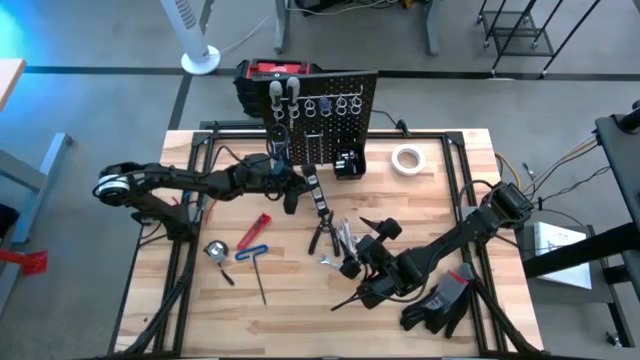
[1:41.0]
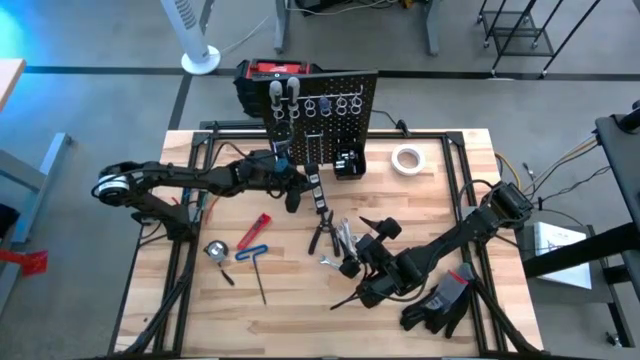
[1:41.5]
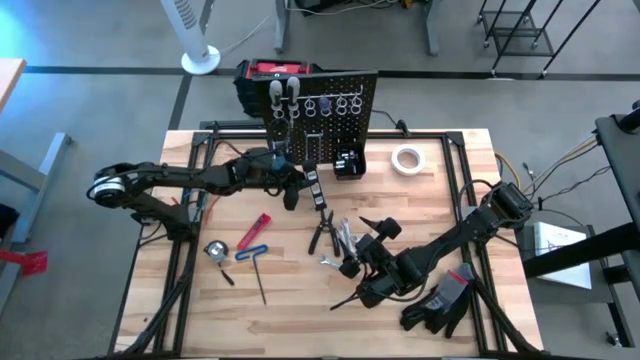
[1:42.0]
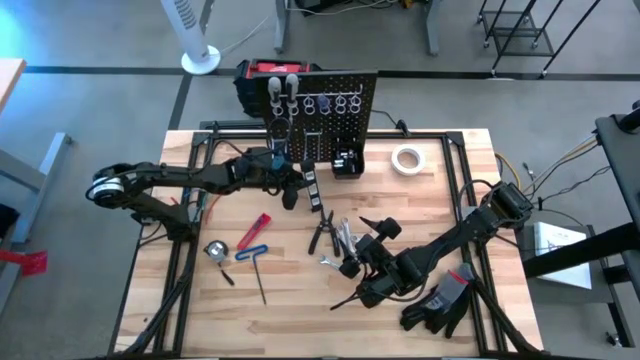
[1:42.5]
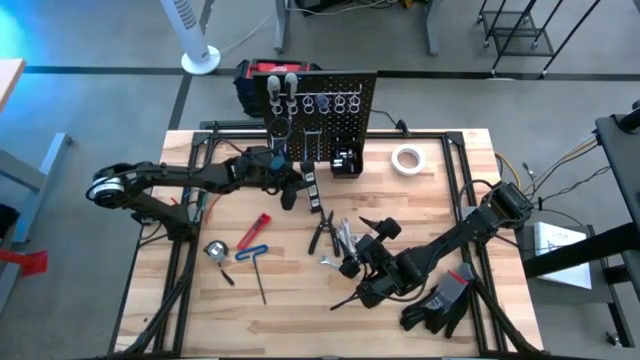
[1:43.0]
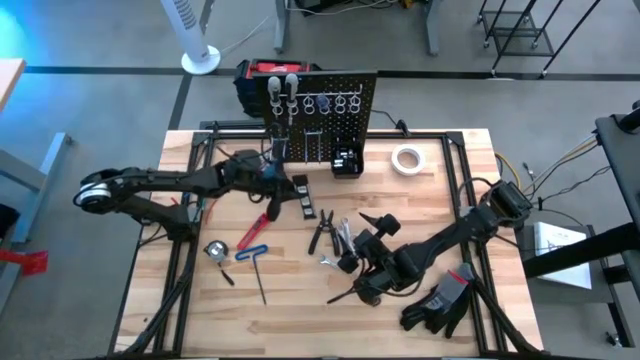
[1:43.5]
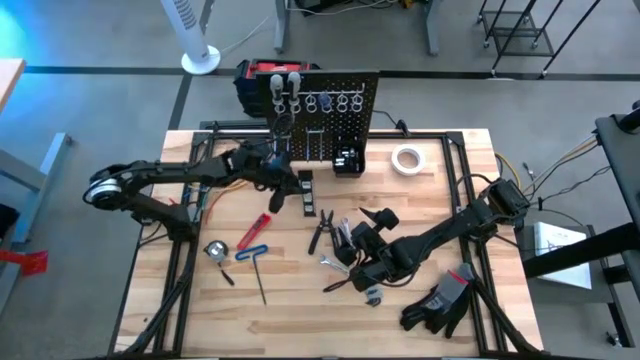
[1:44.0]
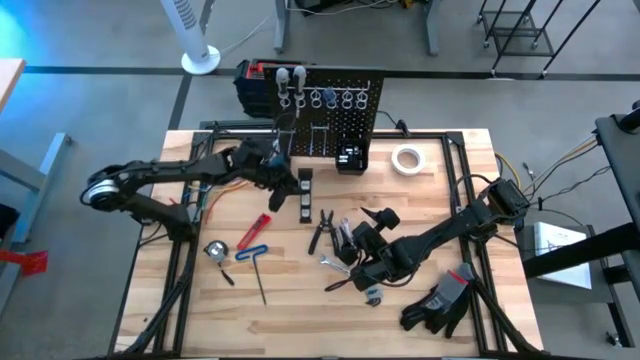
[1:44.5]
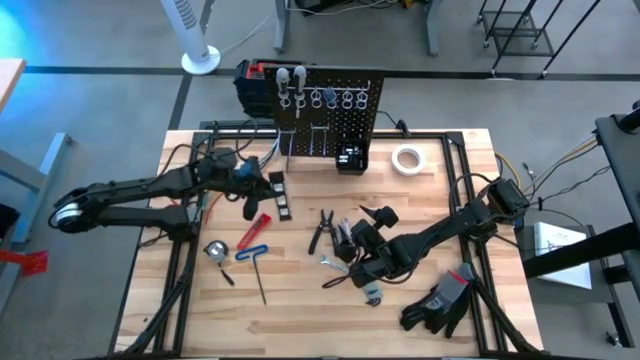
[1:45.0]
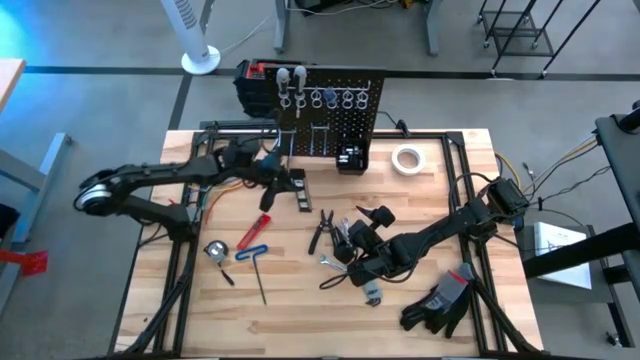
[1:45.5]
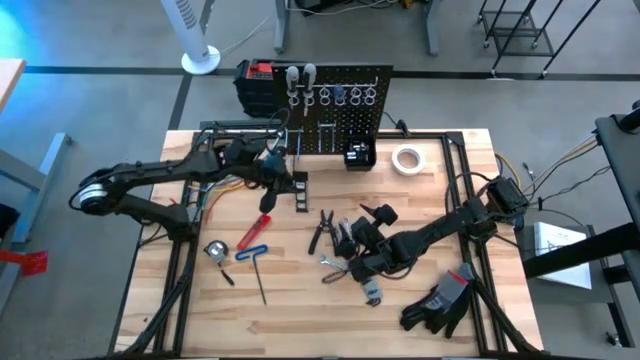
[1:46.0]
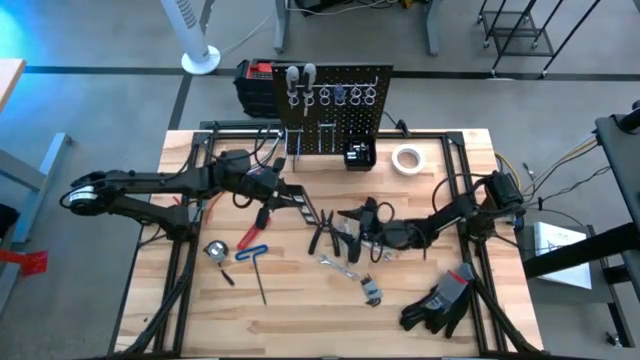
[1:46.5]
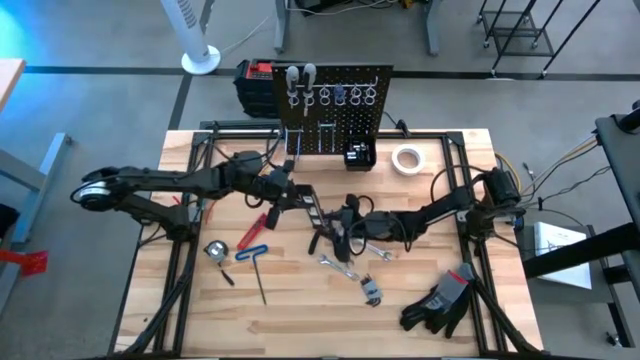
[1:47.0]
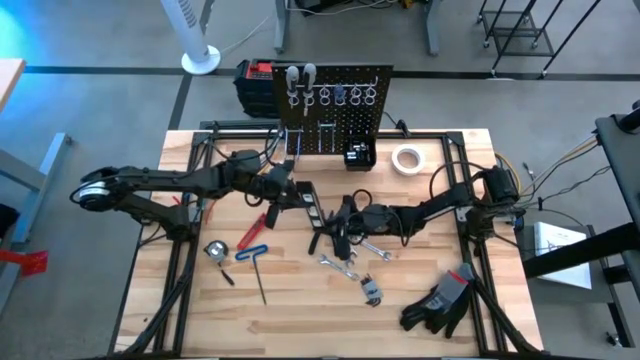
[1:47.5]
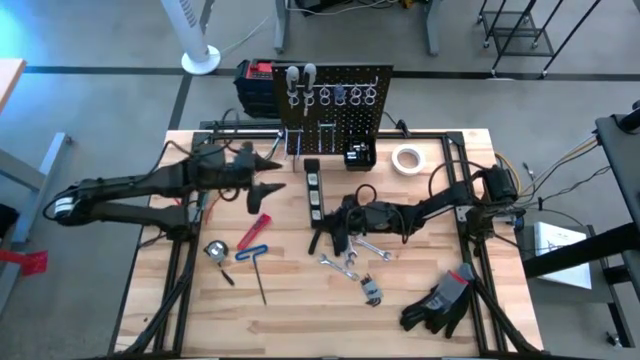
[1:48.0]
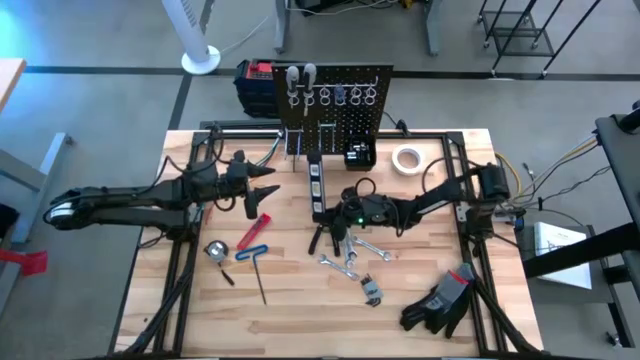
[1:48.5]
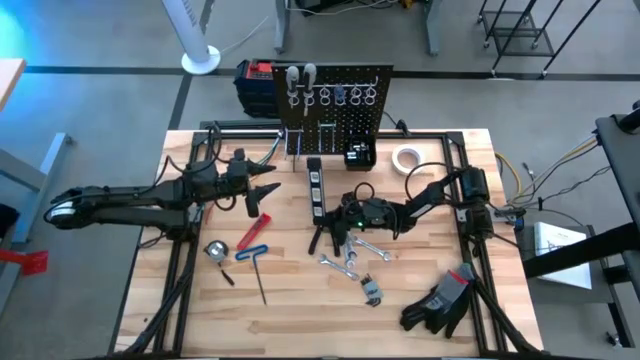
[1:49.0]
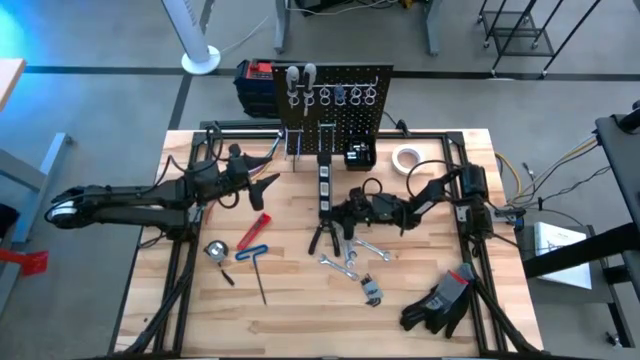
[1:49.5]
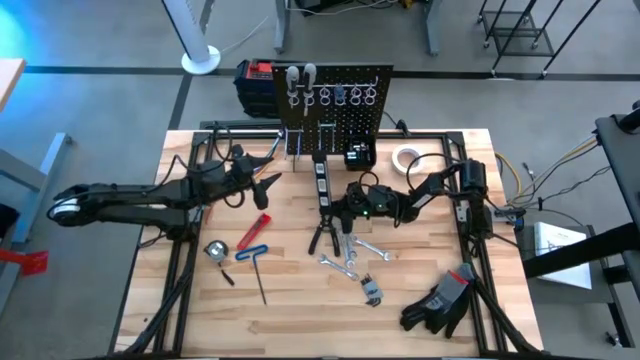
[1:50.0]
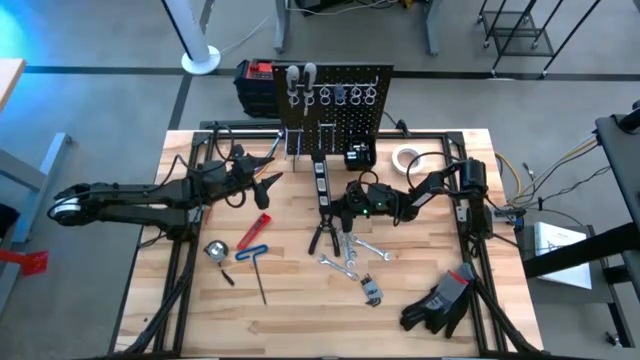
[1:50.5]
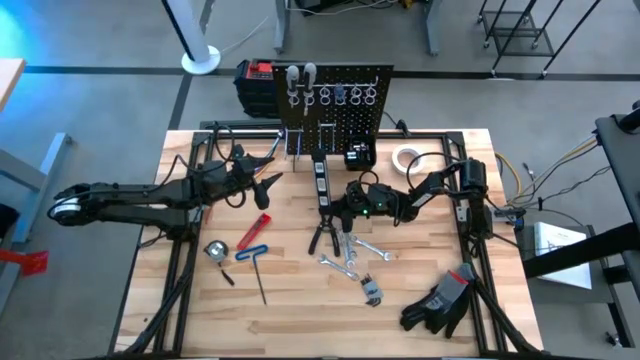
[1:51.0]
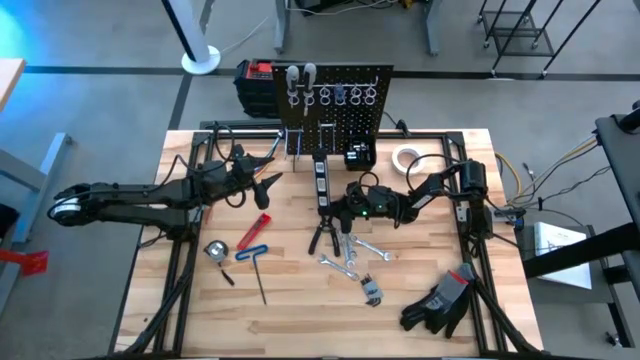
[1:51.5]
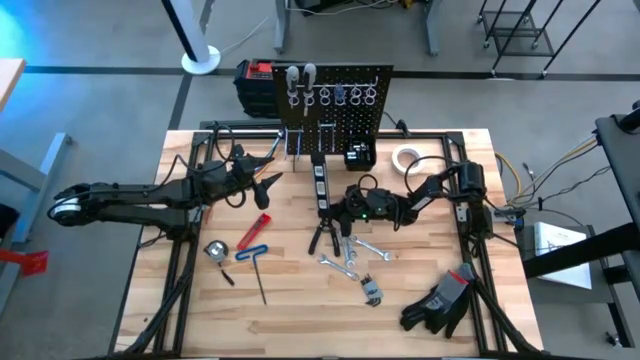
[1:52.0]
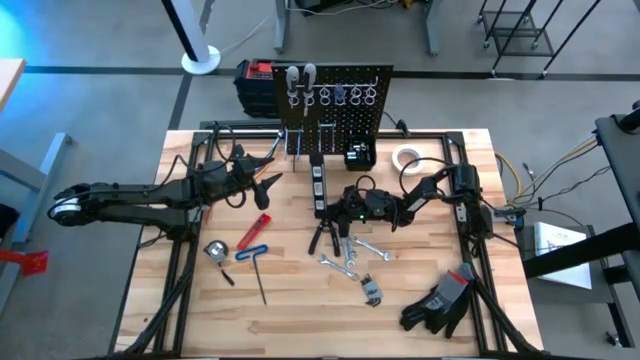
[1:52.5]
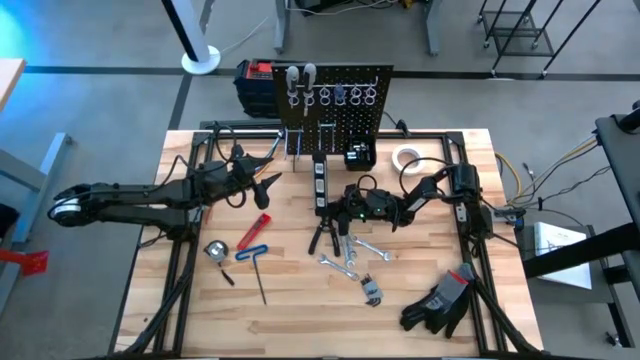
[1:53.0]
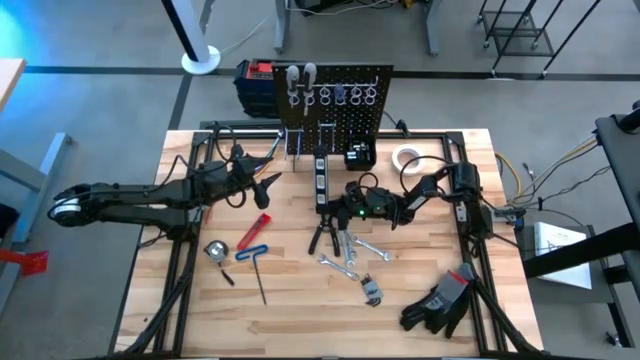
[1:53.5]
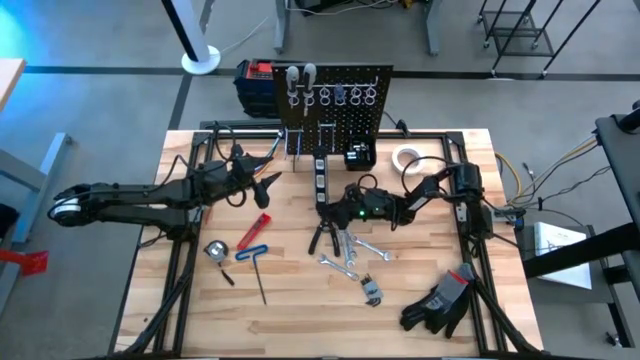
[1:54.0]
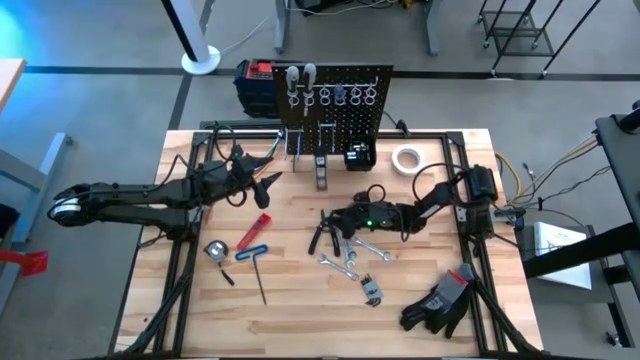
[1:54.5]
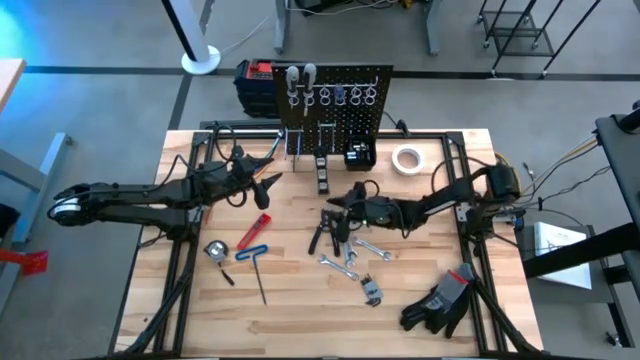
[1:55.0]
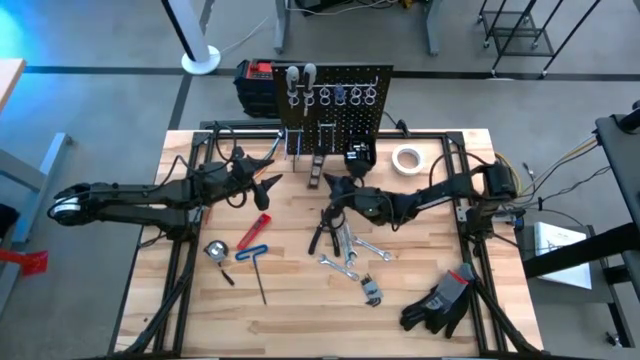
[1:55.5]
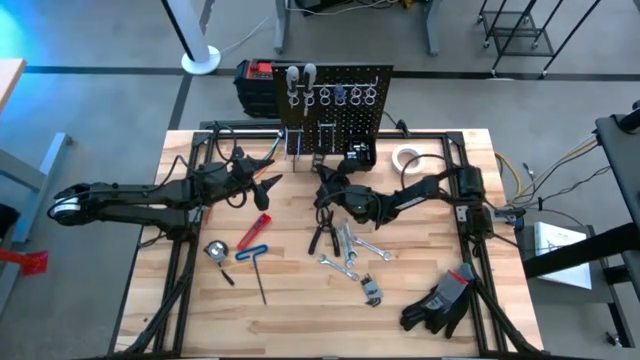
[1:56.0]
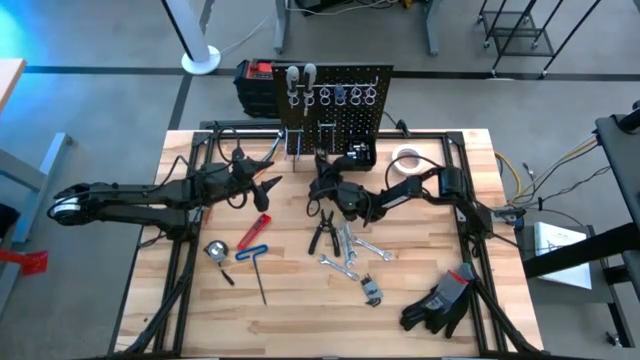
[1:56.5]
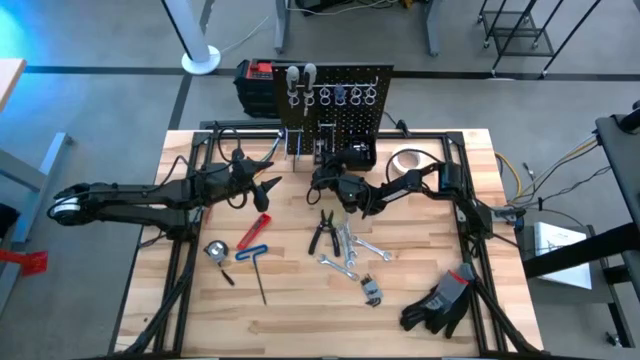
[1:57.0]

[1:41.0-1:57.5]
Task: Hang tools onto peg board
Hang the spirit level on the peg board

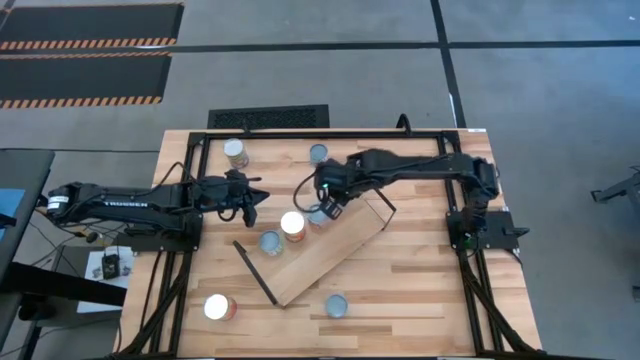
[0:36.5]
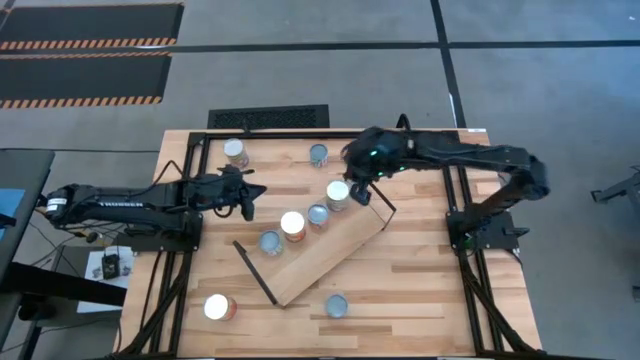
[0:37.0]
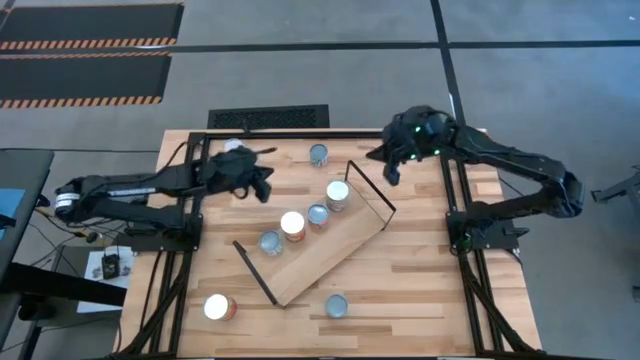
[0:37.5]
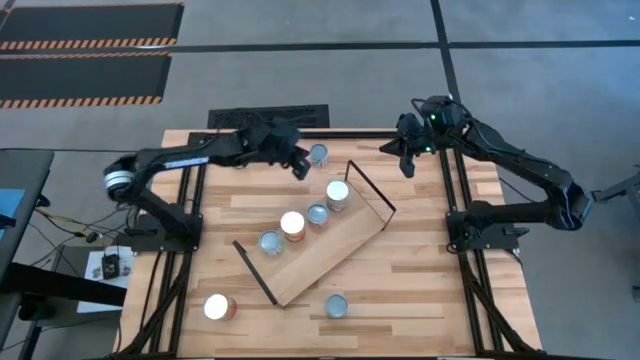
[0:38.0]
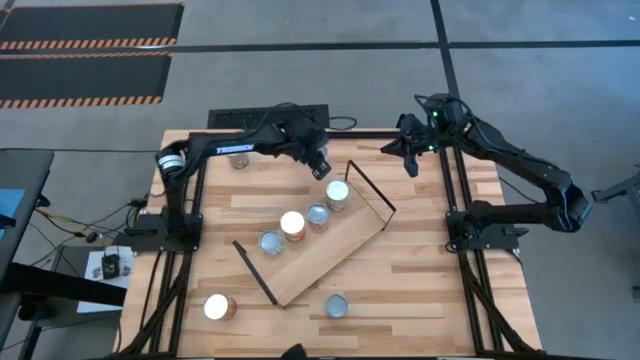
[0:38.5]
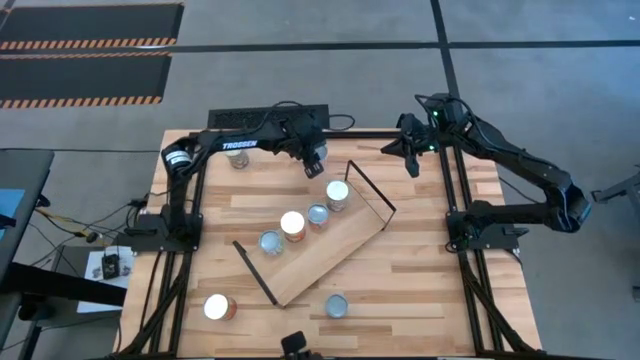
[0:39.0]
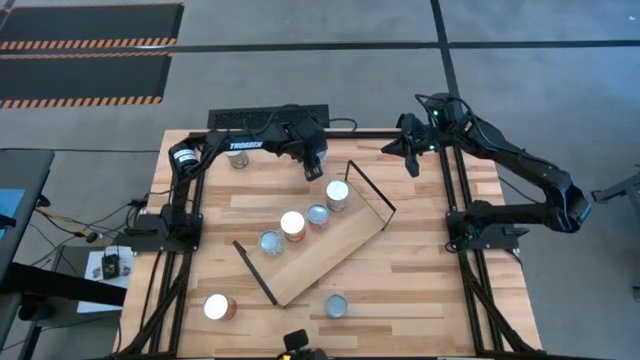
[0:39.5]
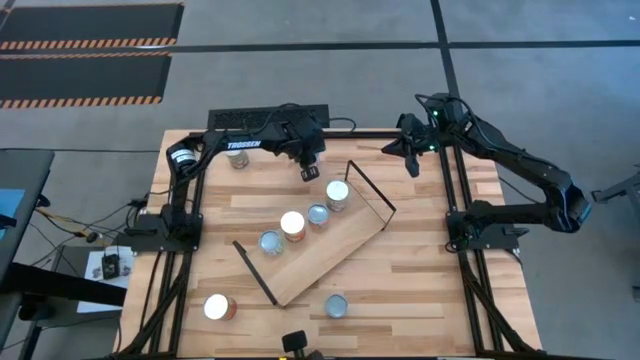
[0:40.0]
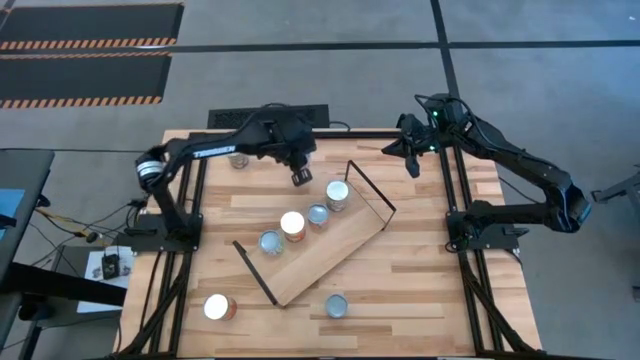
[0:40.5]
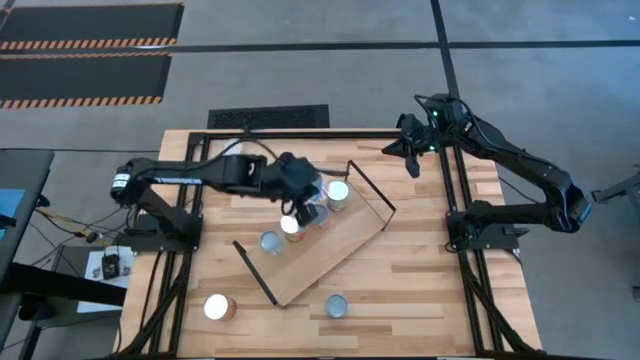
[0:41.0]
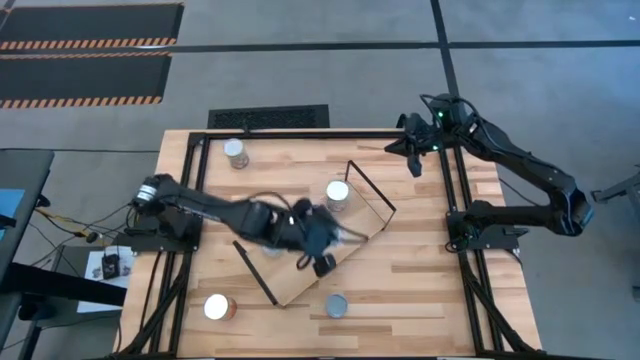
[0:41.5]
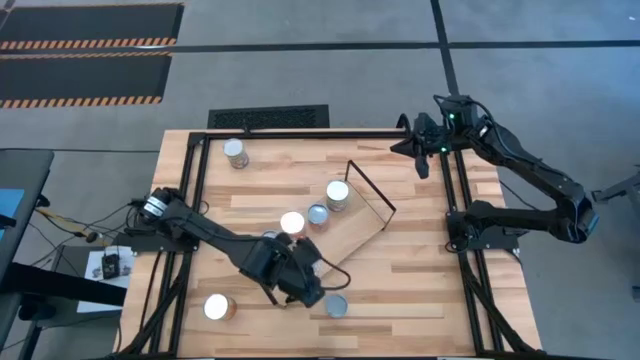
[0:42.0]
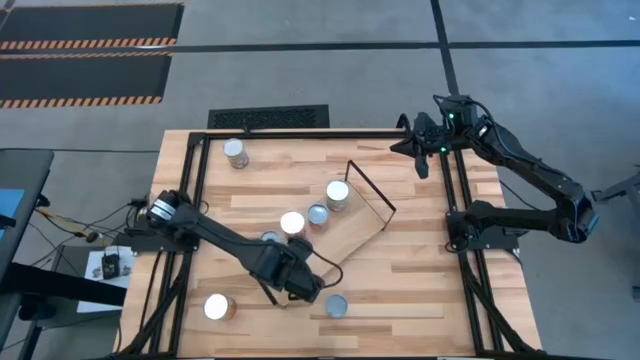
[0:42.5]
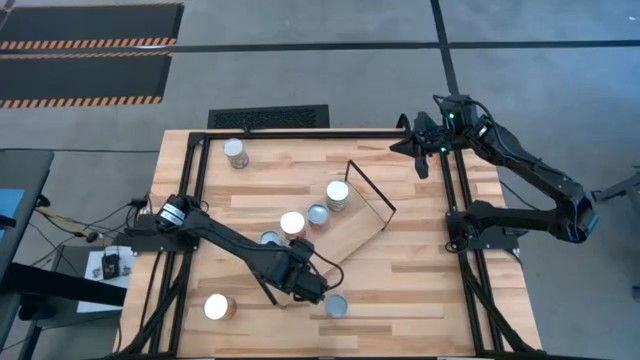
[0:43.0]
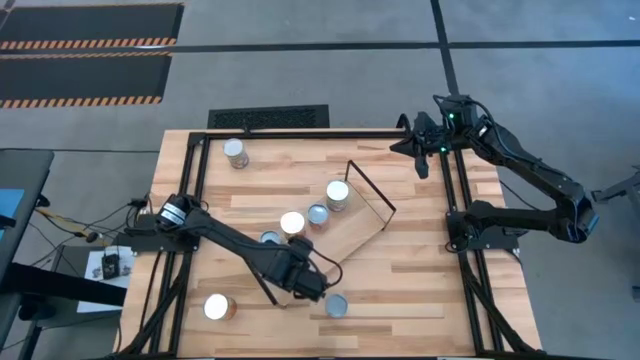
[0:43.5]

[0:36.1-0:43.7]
Task: Pick and place cans onto a shelf
Put the canned carrots on the shelf
